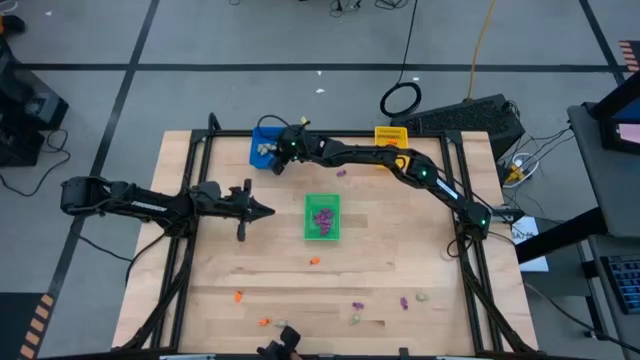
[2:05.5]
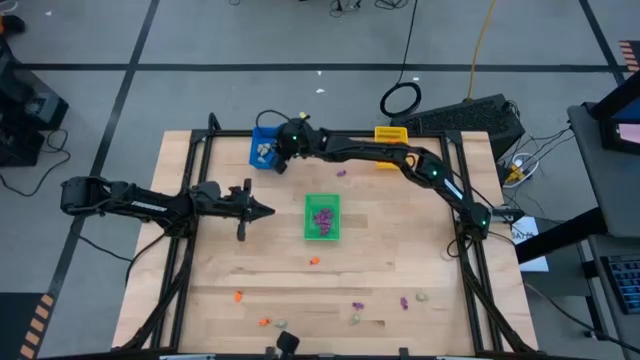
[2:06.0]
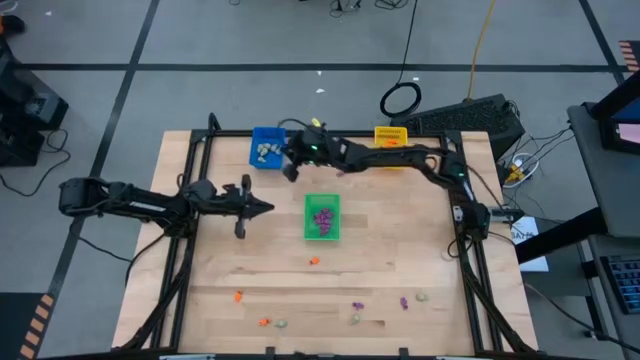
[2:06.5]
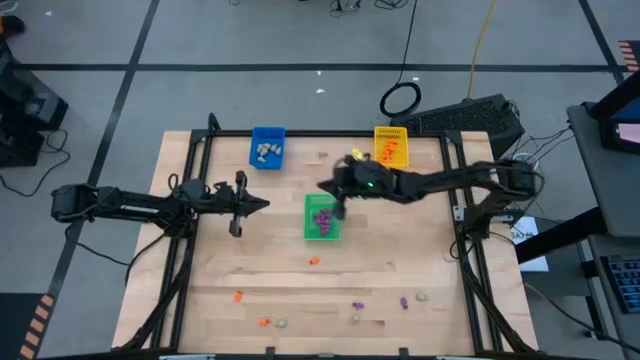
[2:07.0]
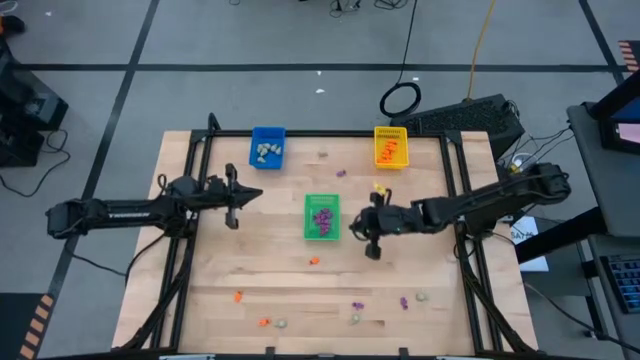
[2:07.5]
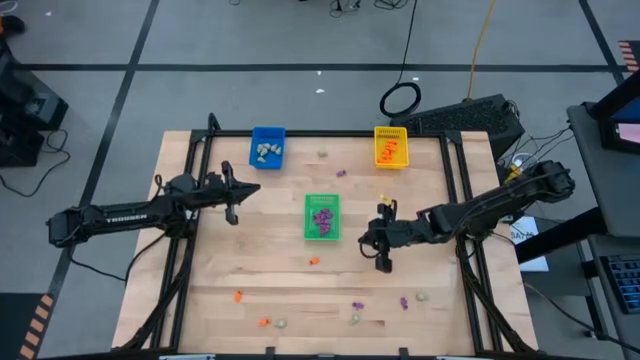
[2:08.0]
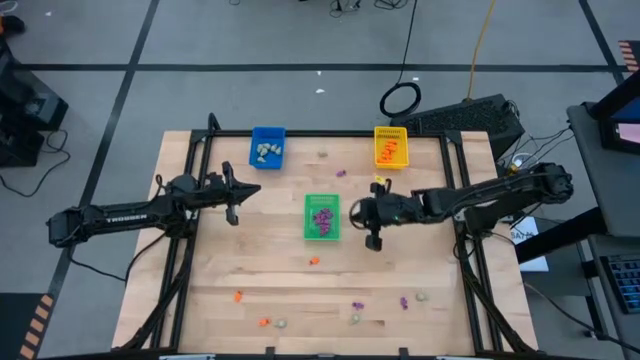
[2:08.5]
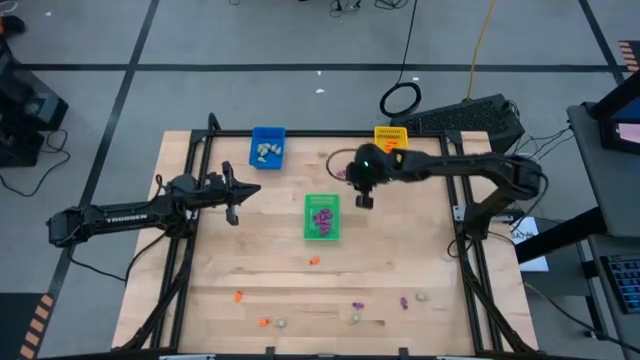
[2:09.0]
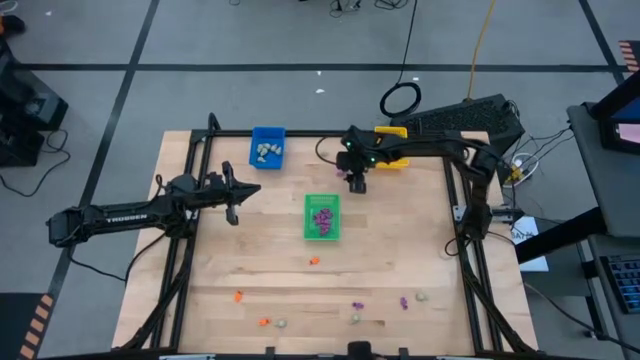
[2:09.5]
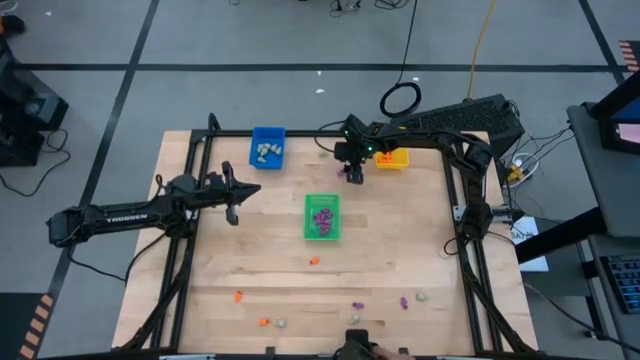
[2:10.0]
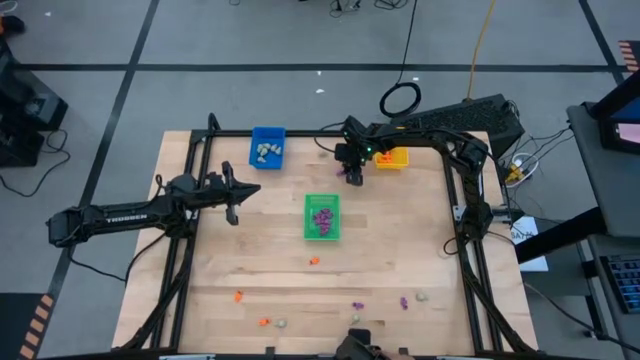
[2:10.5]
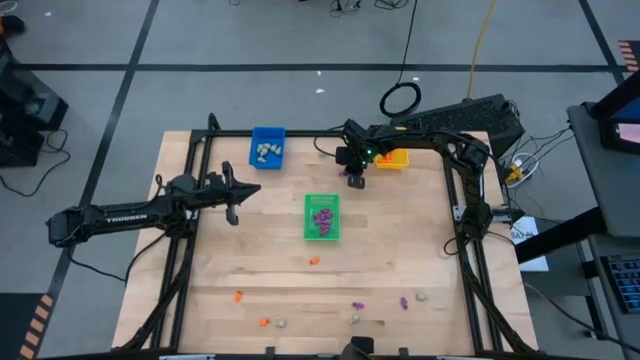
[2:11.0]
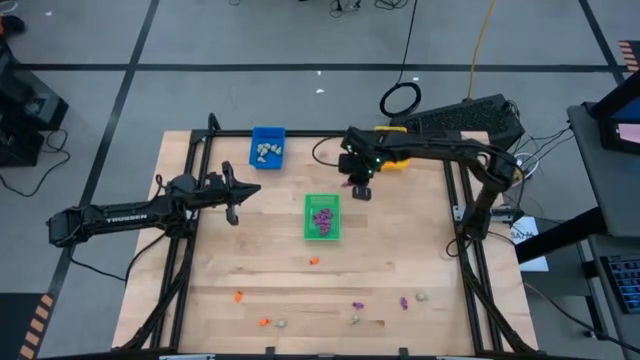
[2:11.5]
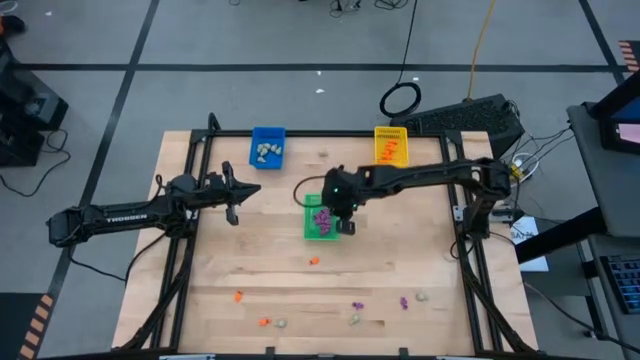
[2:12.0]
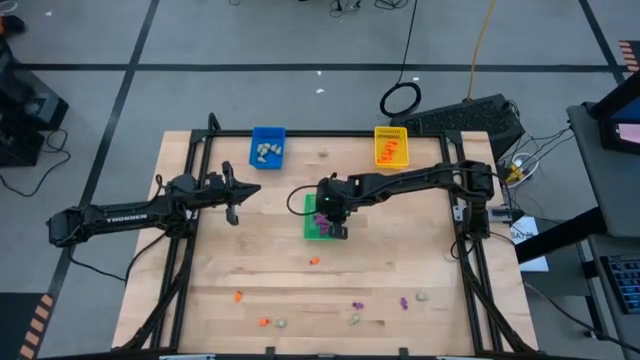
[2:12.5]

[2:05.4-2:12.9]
Task: Sort Halloween decoration
Put the purple skeleton toy into the green bin

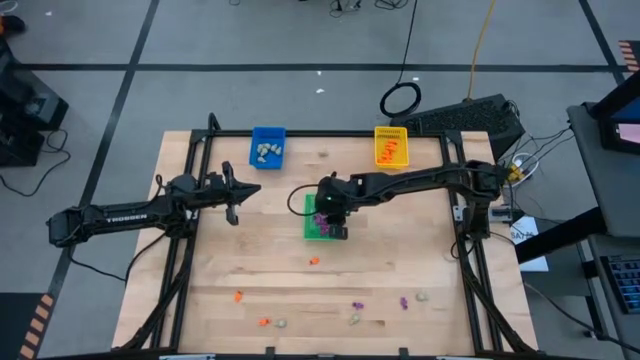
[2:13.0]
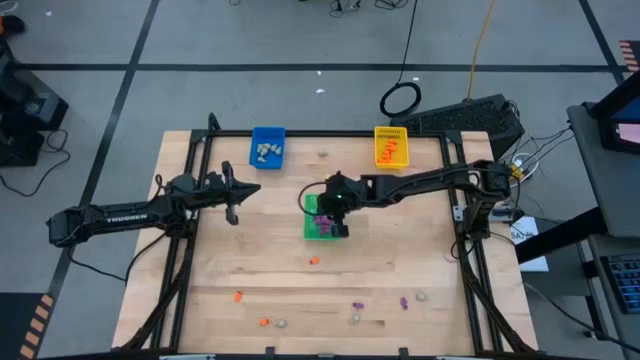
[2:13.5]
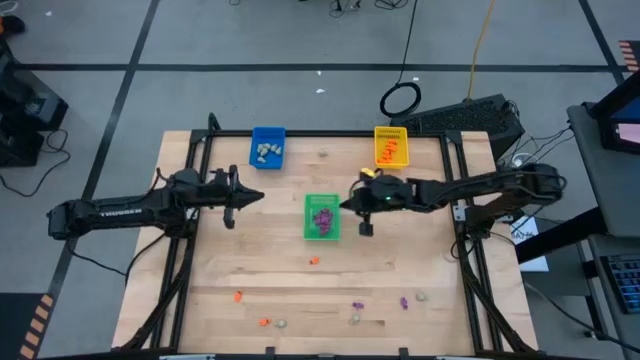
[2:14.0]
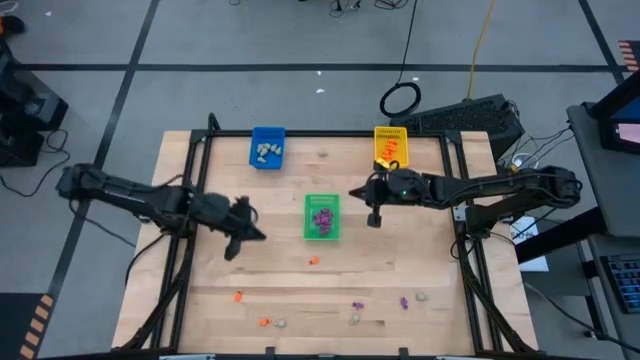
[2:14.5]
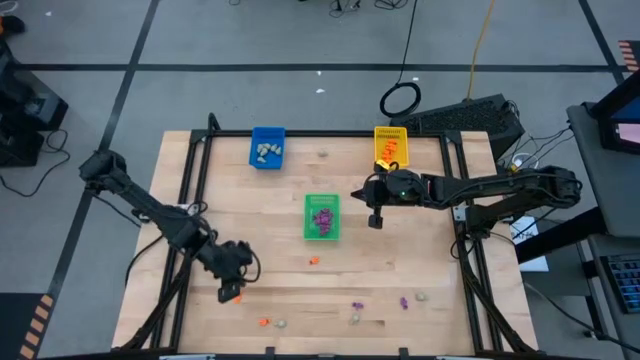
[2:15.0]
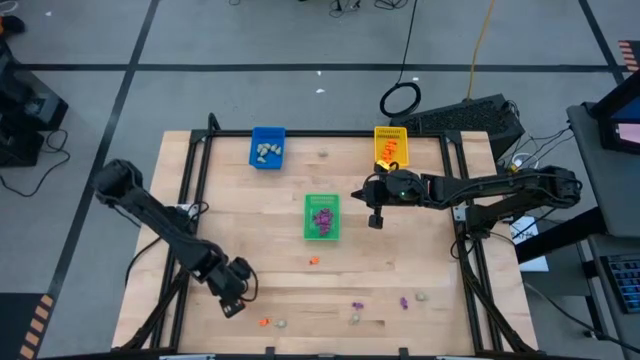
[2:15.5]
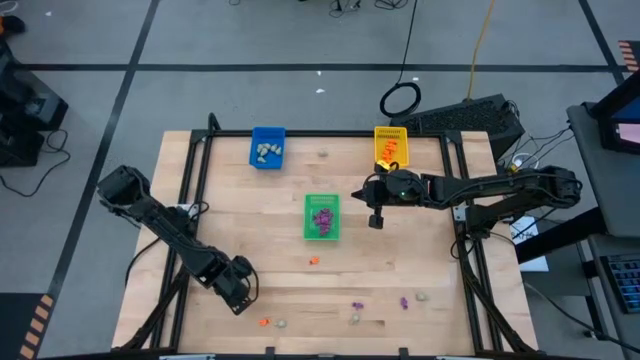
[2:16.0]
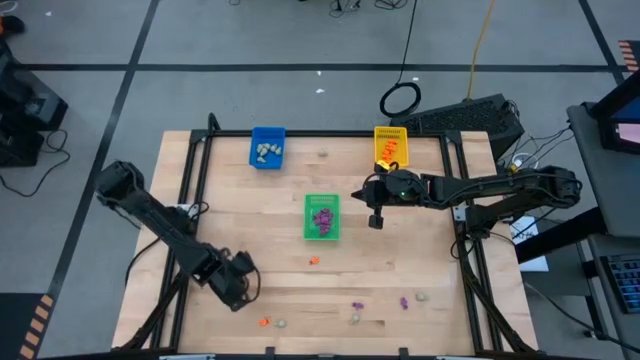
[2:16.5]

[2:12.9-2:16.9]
Put the orange skeleton toy into the yellow bin

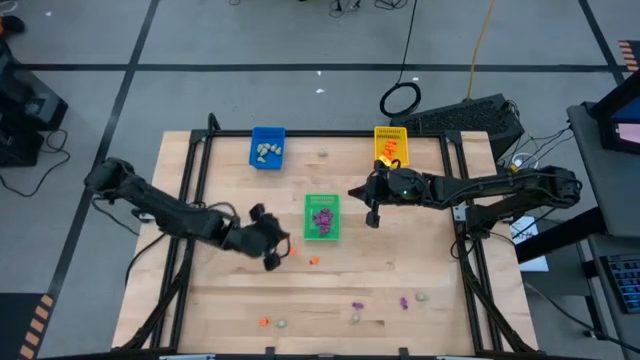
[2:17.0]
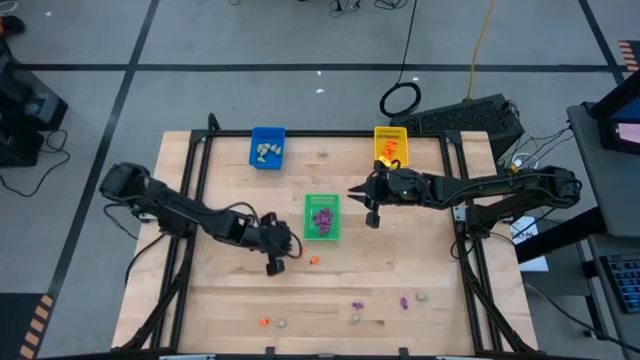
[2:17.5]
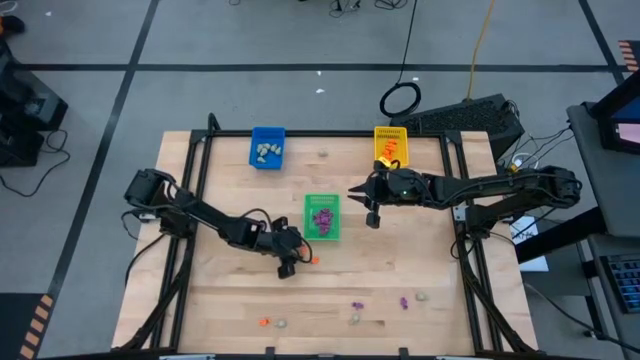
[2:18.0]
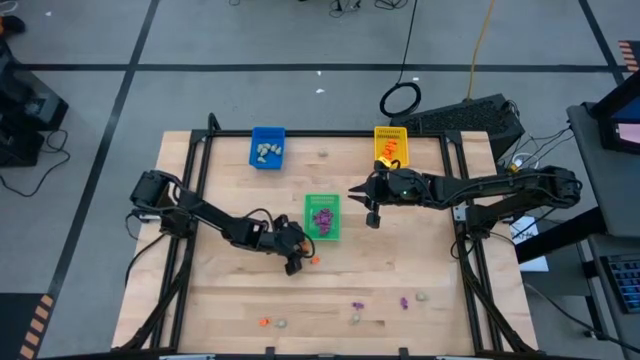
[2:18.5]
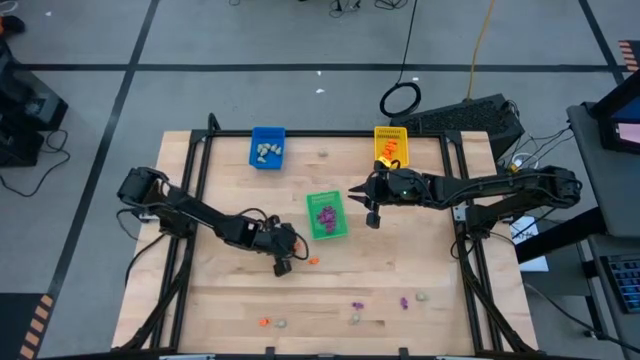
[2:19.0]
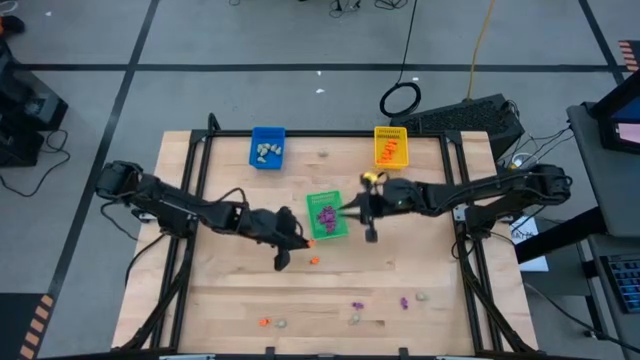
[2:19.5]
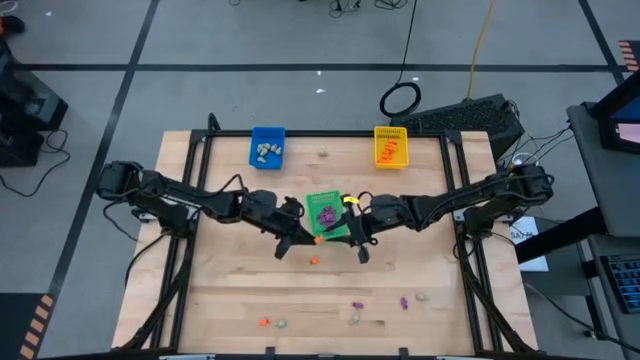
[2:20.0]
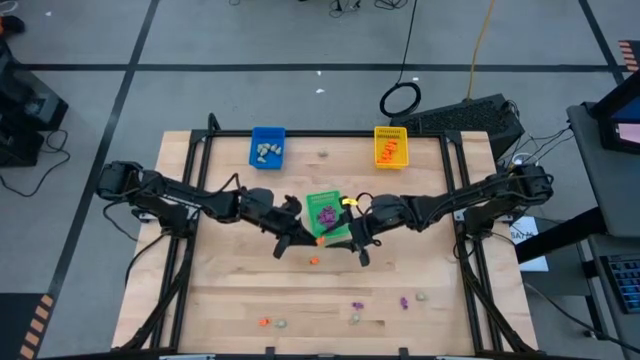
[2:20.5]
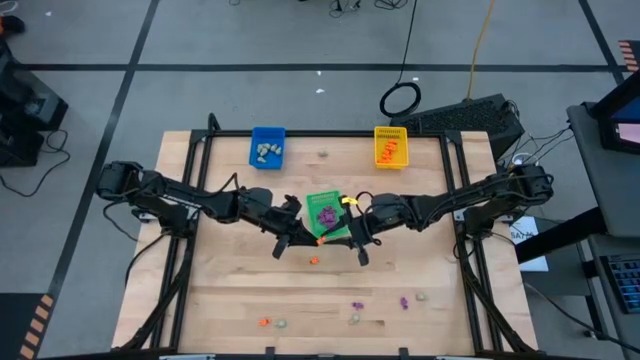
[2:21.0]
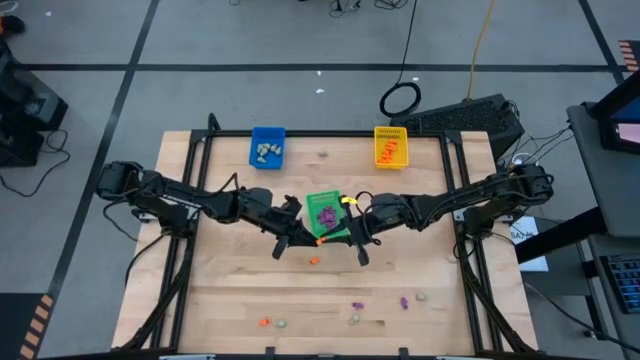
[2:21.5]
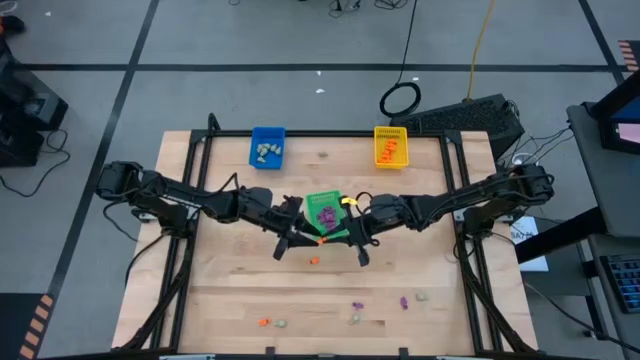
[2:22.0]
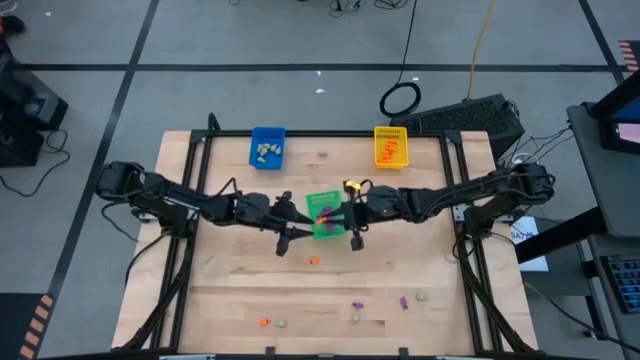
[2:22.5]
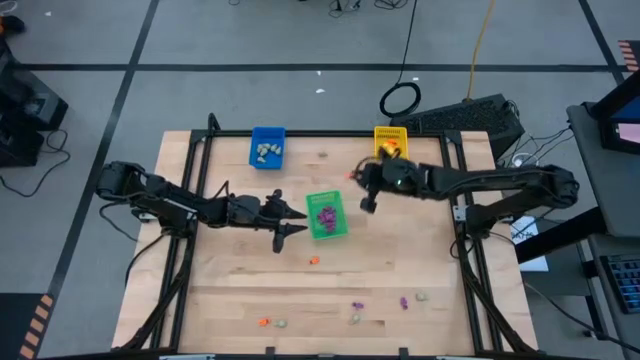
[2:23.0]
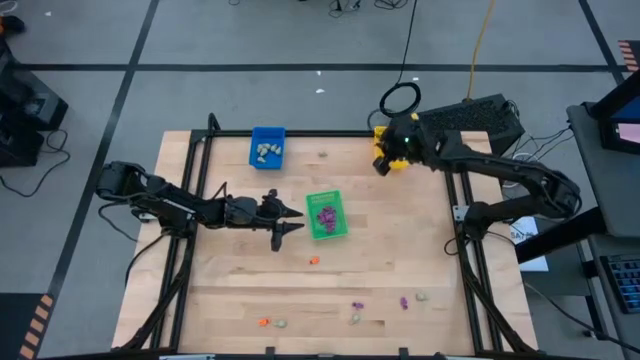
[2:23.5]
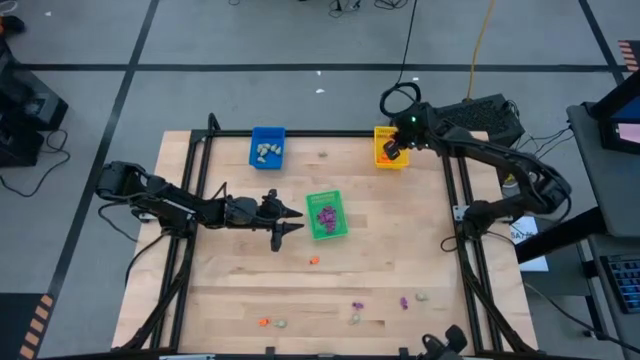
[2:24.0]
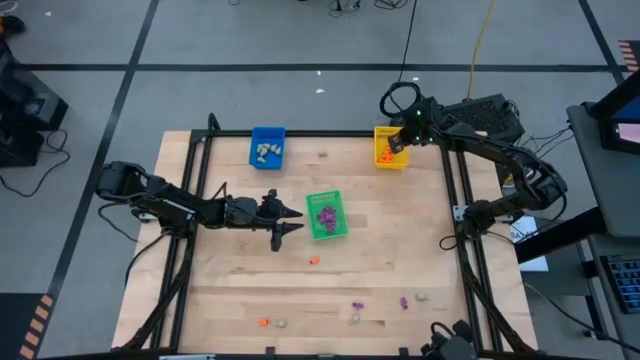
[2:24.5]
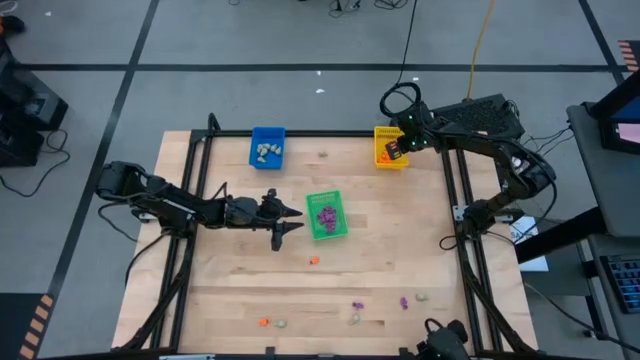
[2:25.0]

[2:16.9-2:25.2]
Put the orange skeleton toy into the yellow bin
